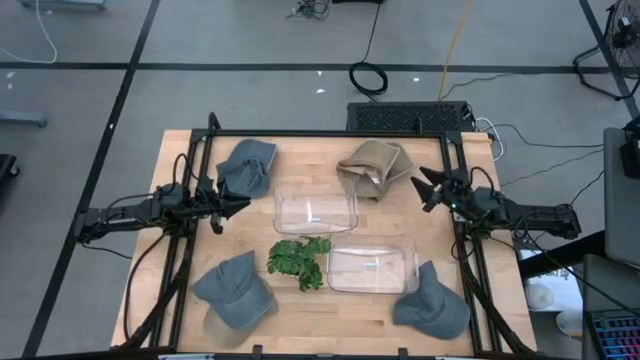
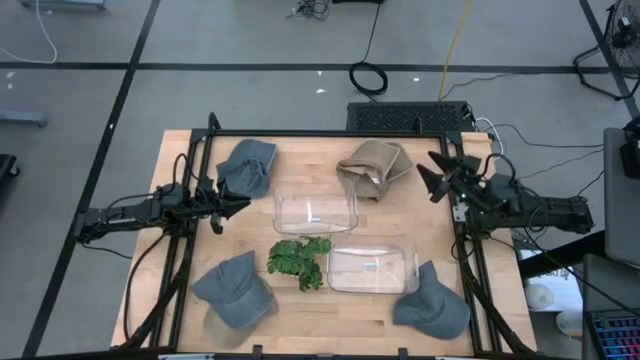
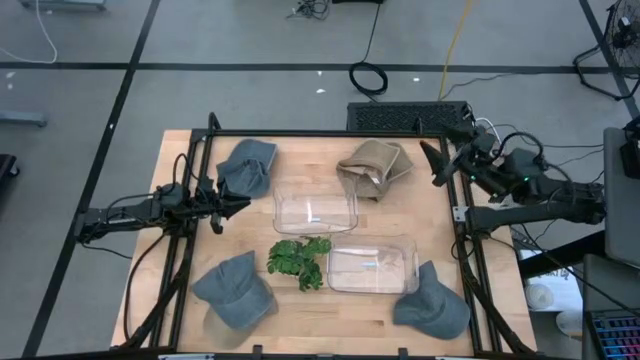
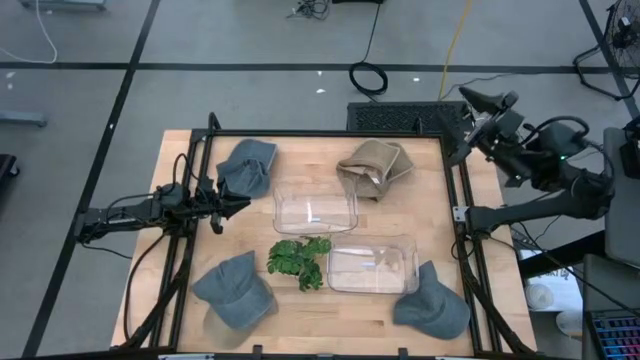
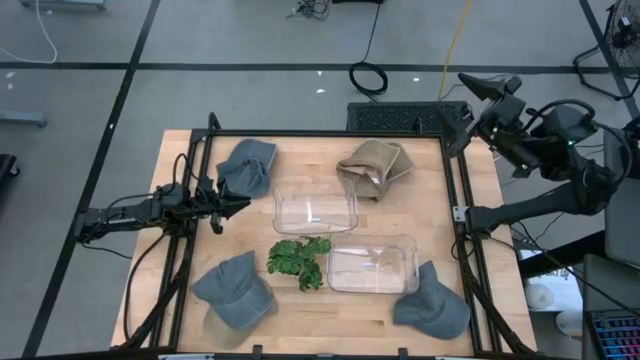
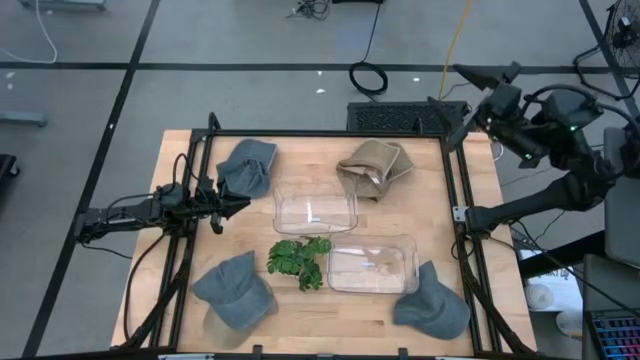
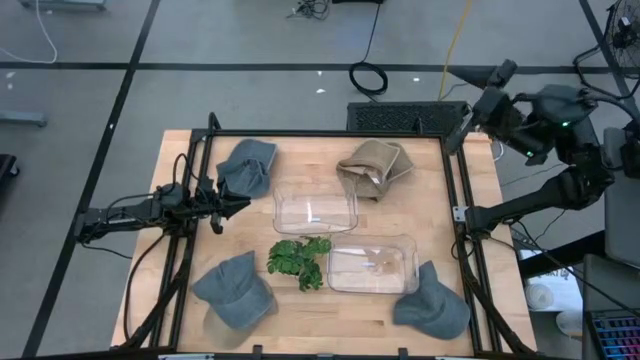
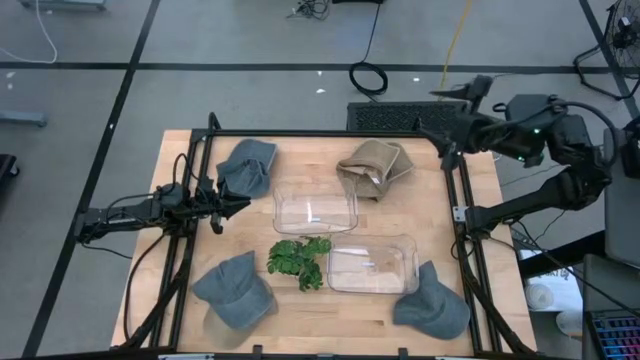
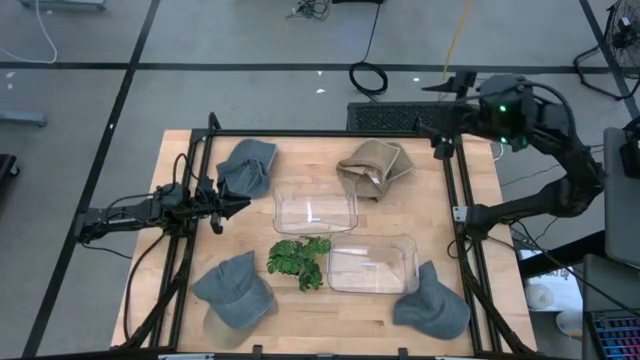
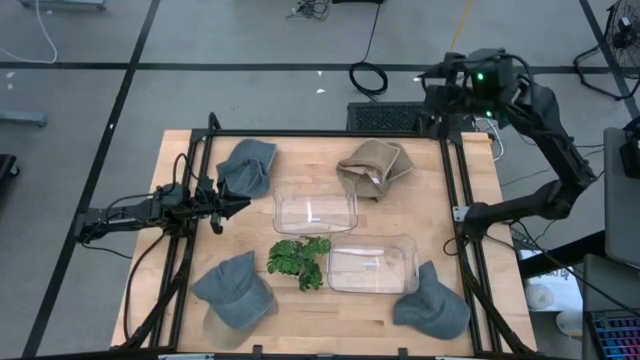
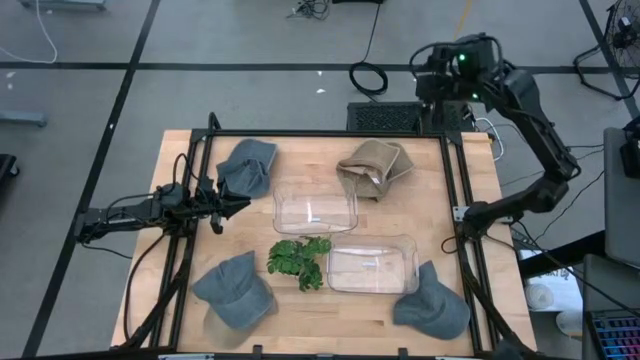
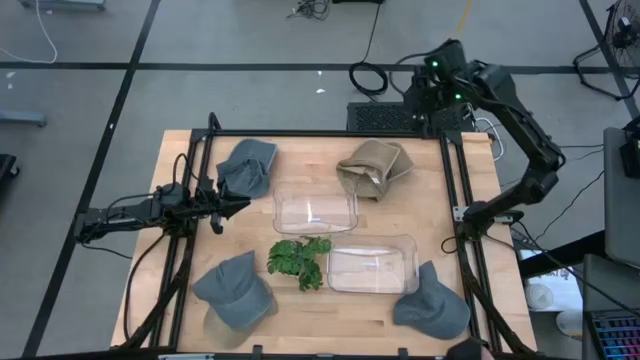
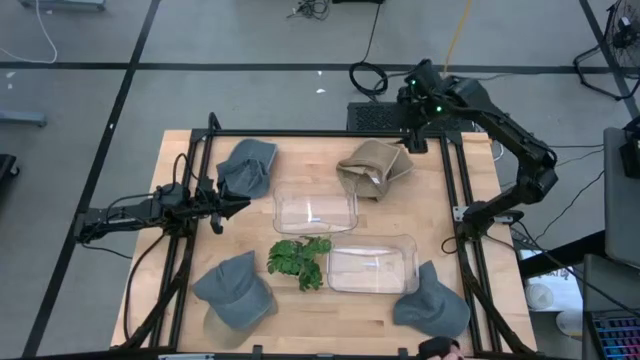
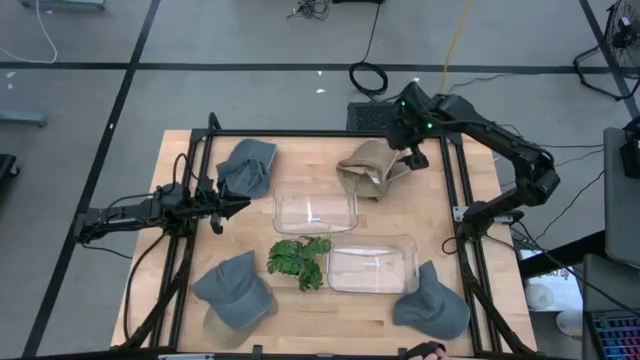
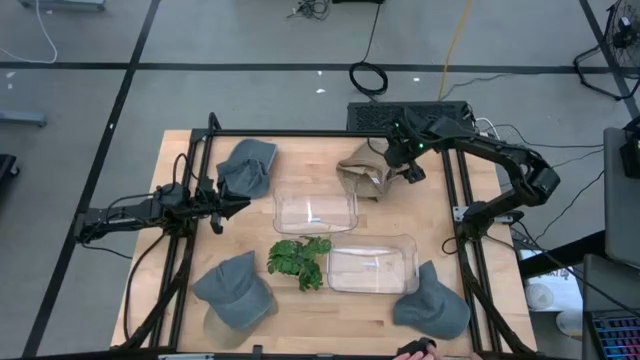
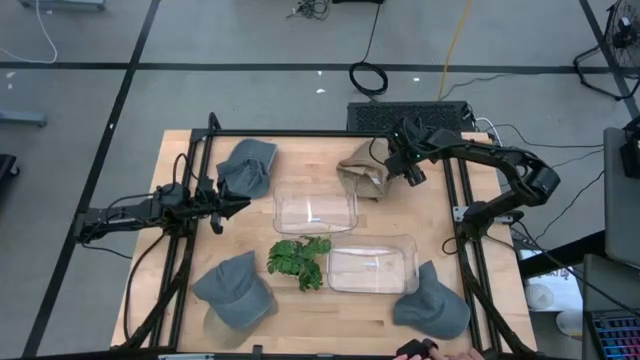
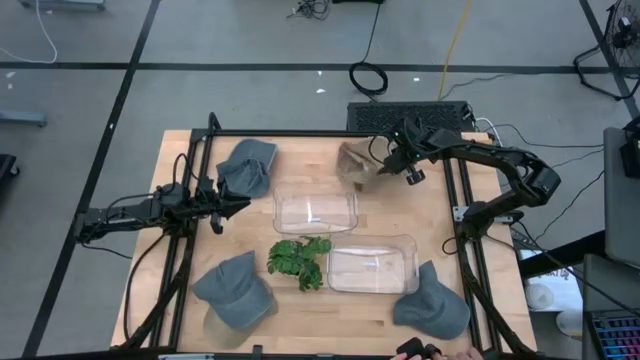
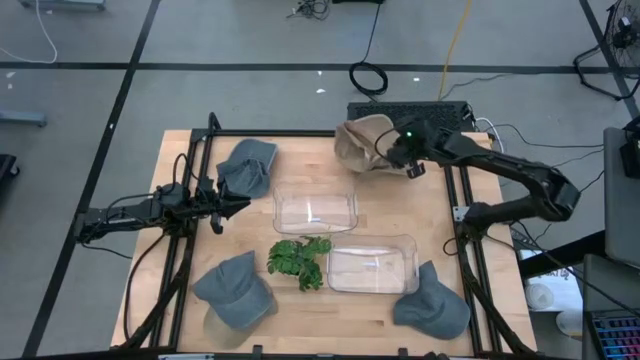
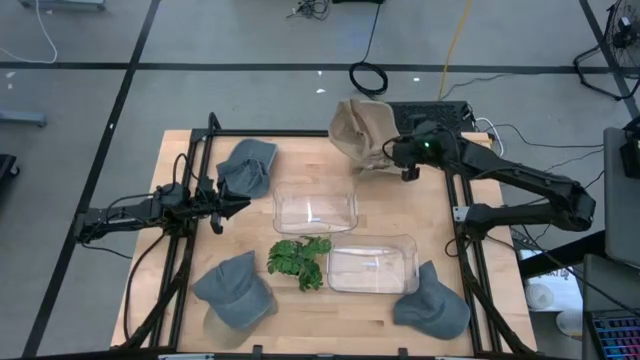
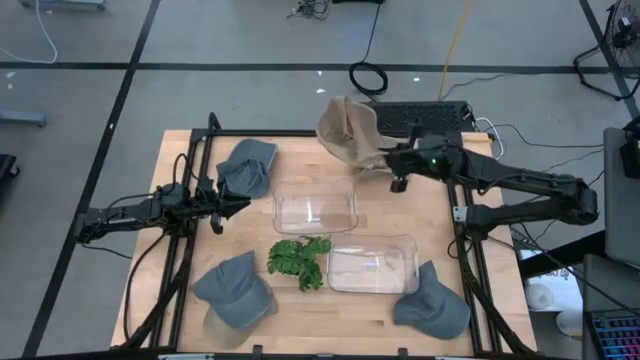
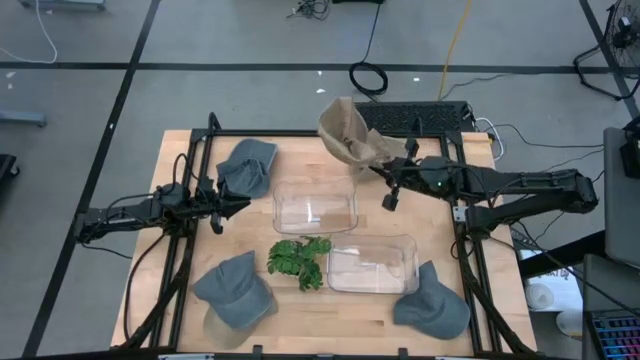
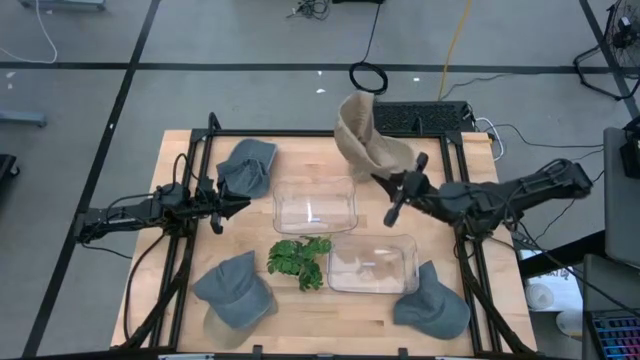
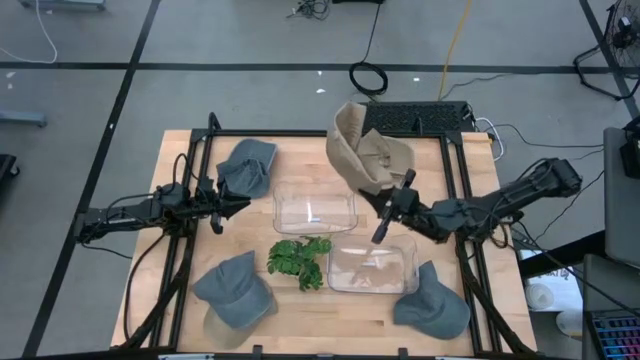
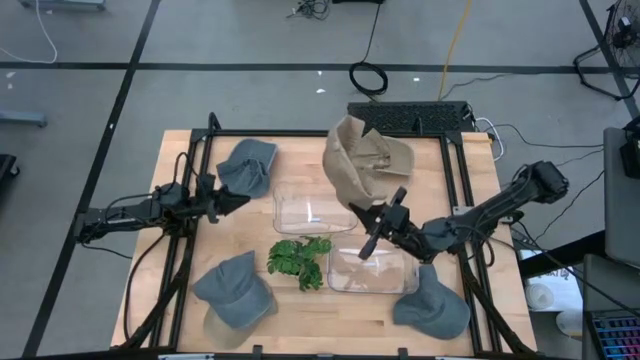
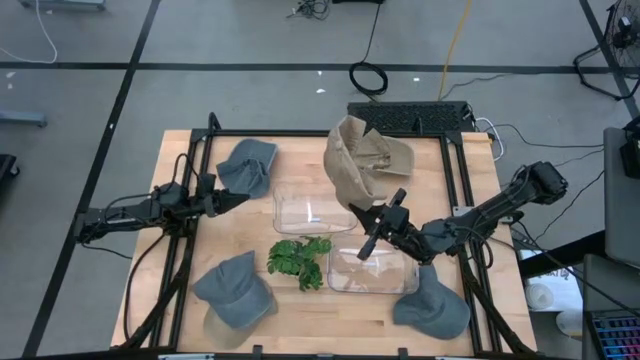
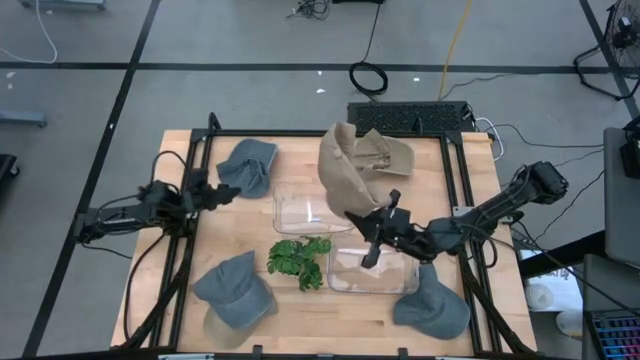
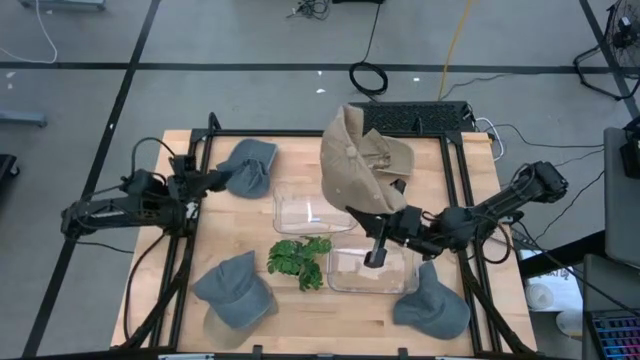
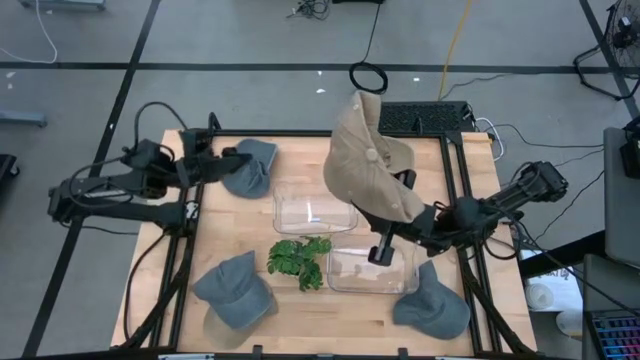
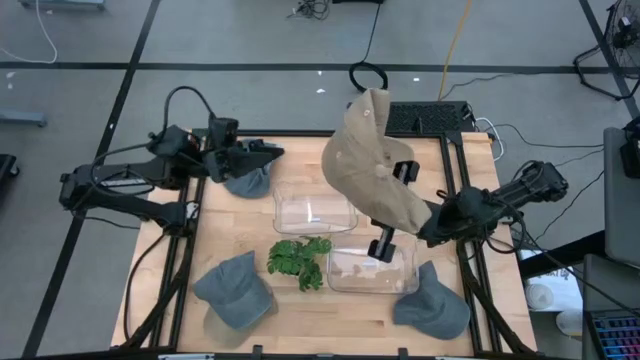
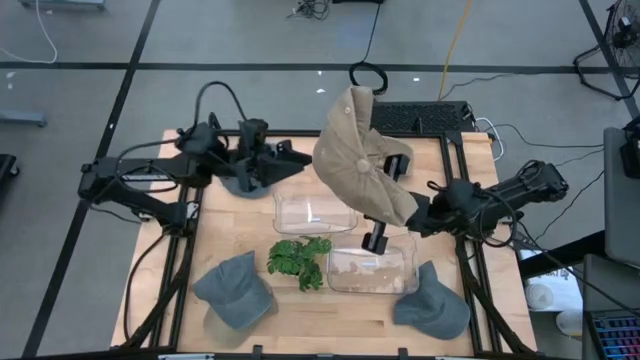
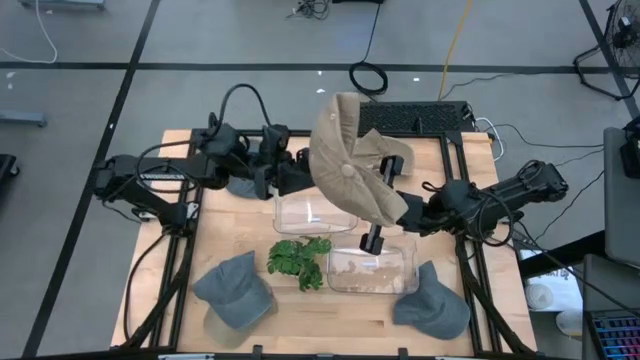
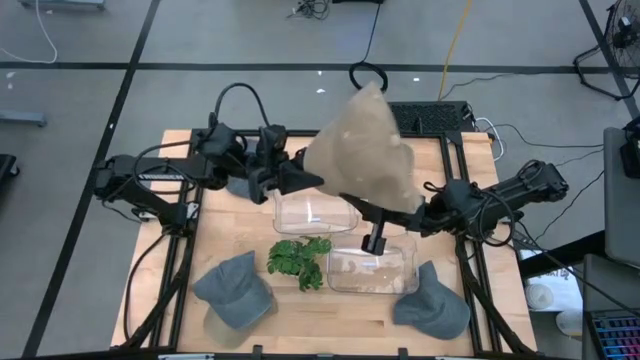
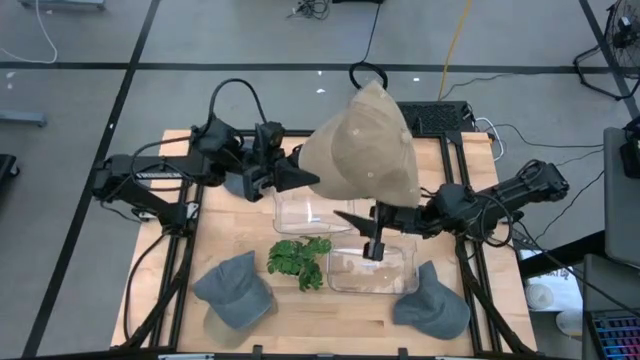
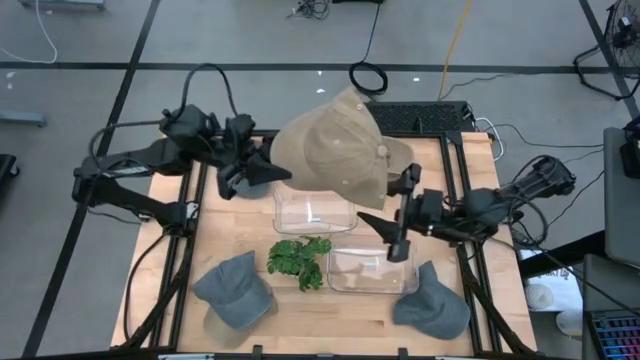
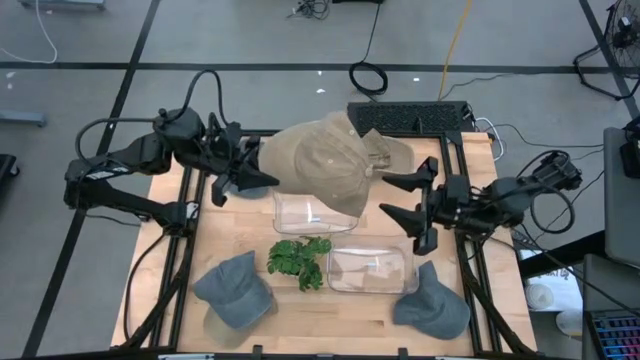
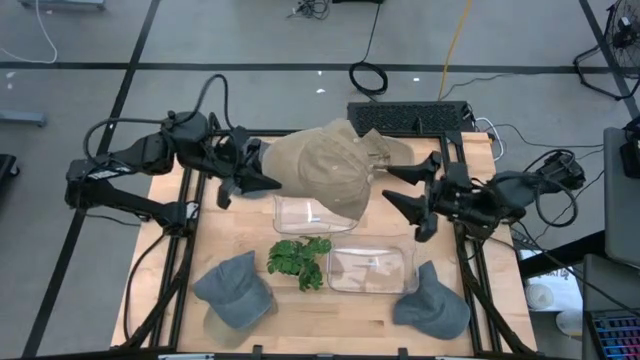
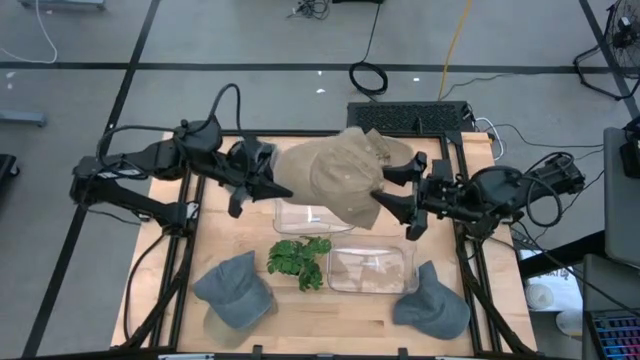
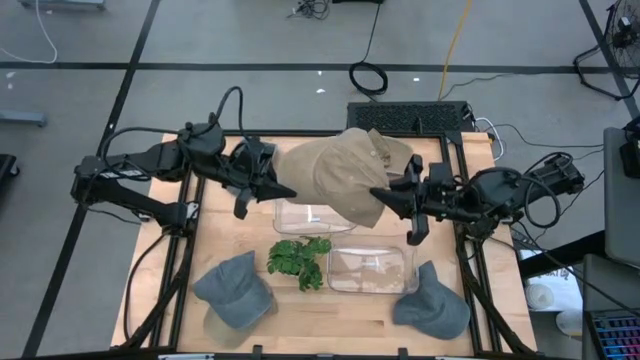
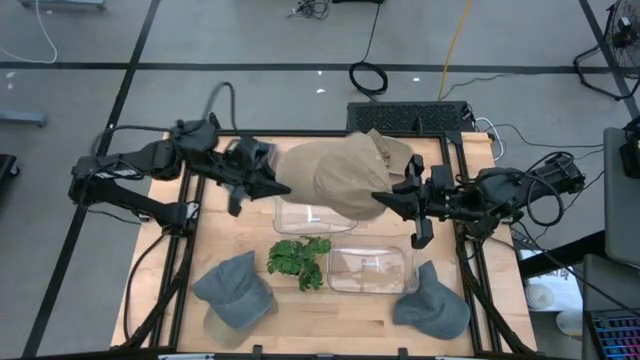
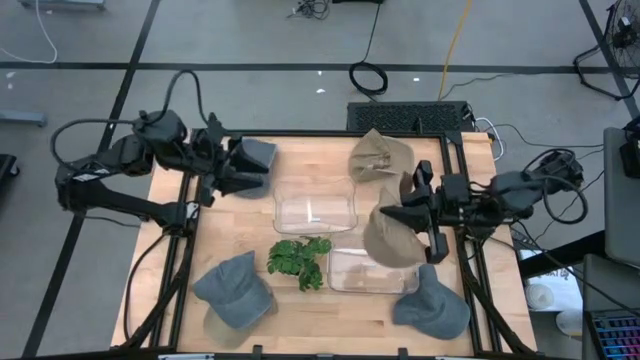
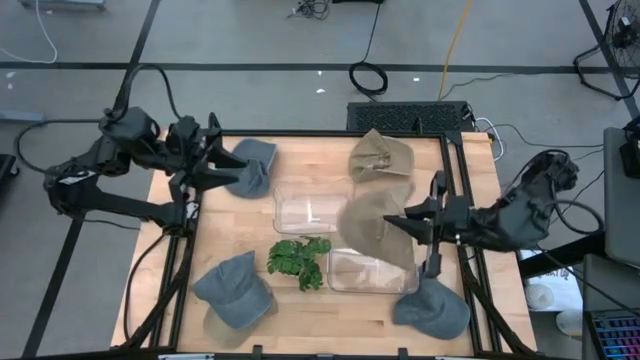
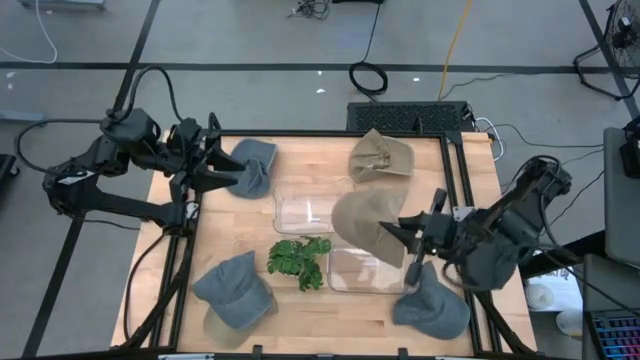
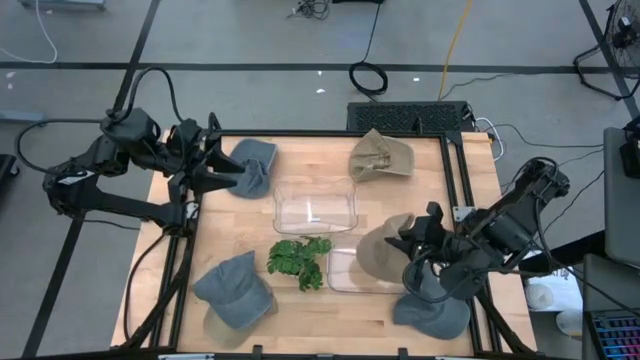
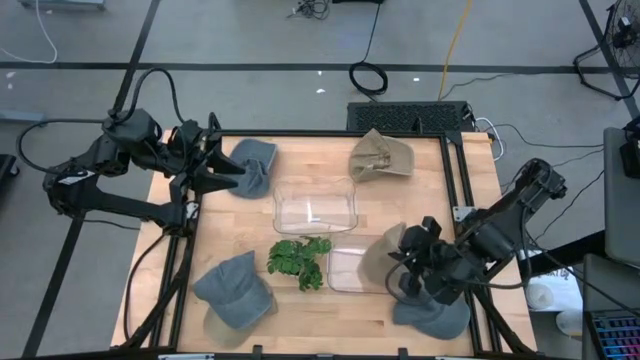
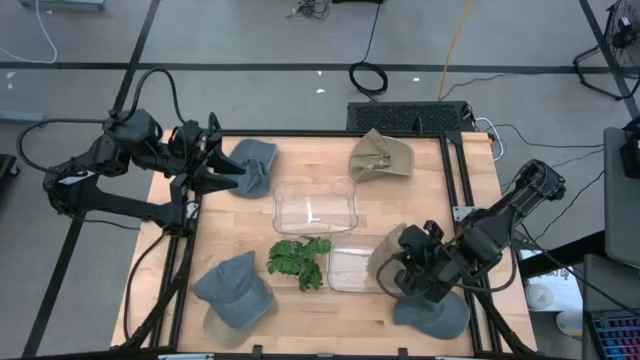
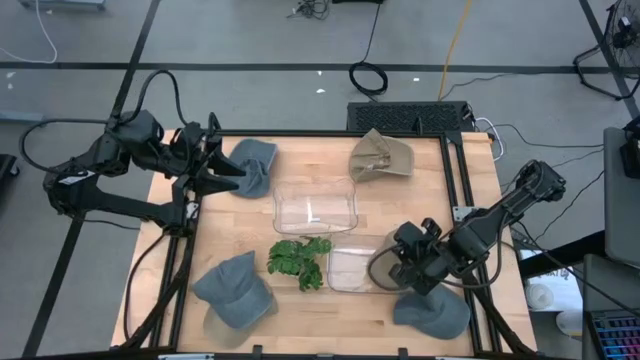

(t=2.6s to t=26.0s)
Task: Pick & Place hat
Put the top left brown cap into the bottom transparent bin
